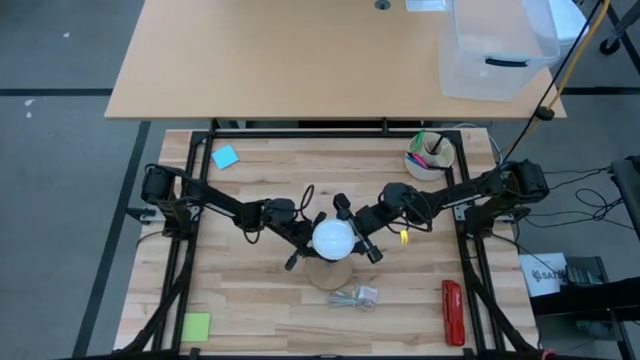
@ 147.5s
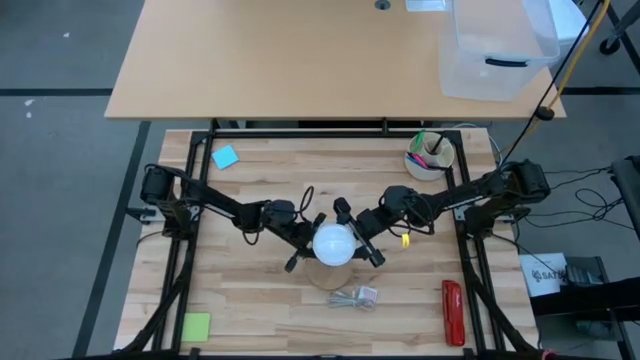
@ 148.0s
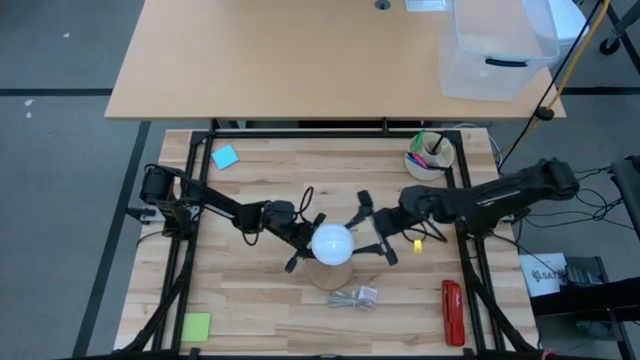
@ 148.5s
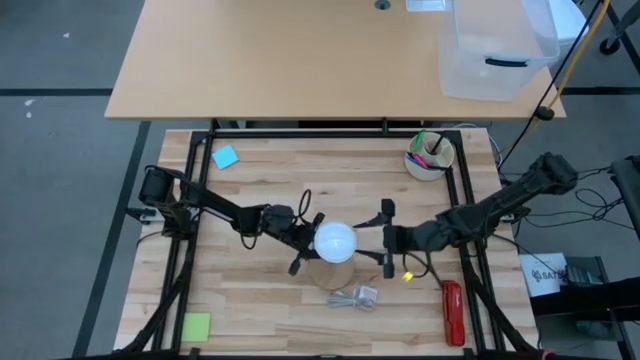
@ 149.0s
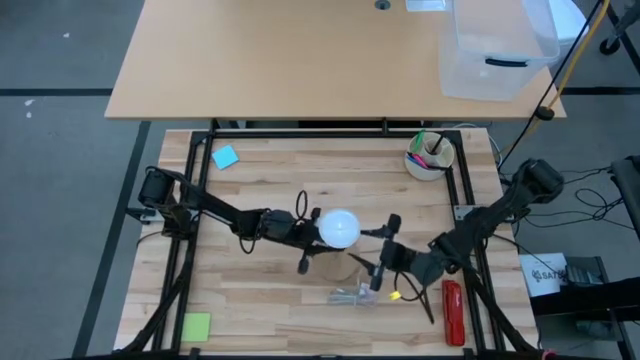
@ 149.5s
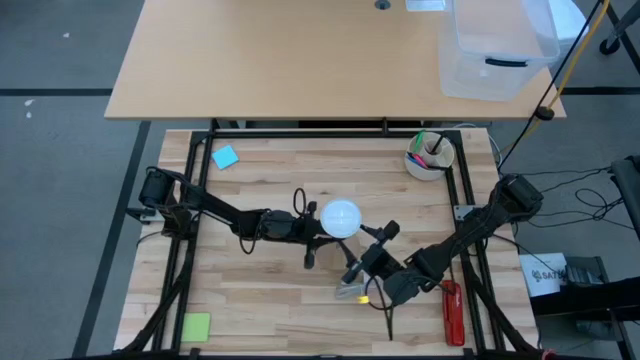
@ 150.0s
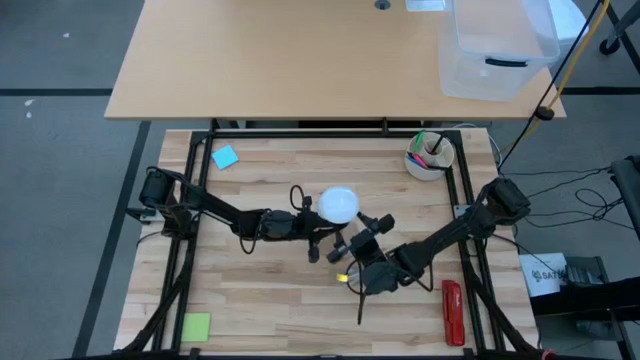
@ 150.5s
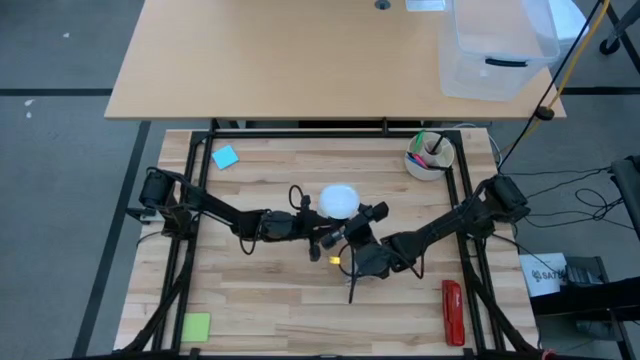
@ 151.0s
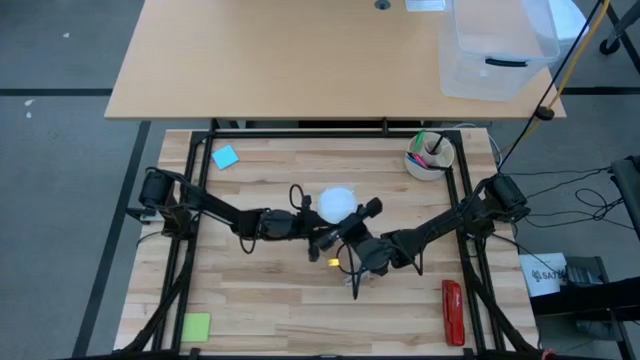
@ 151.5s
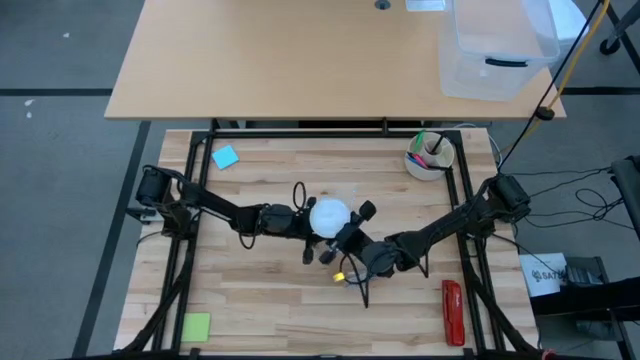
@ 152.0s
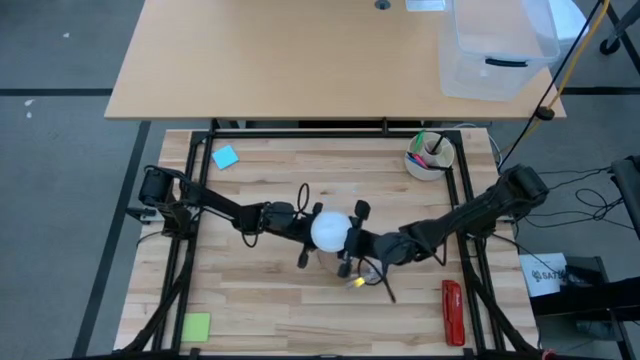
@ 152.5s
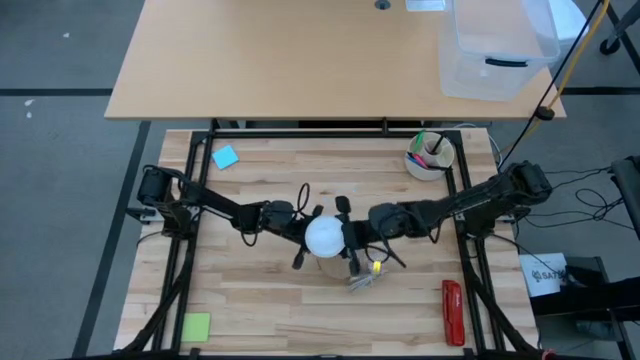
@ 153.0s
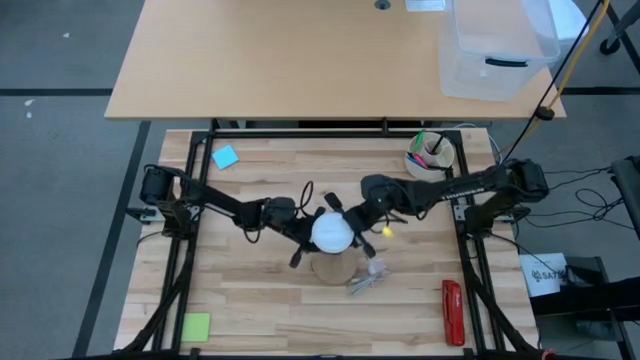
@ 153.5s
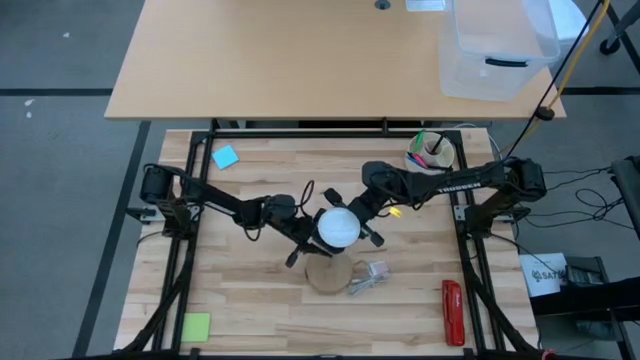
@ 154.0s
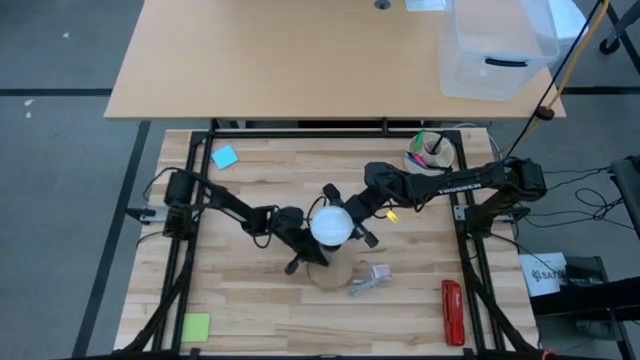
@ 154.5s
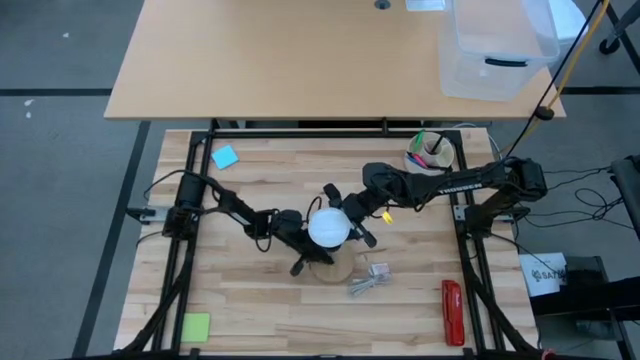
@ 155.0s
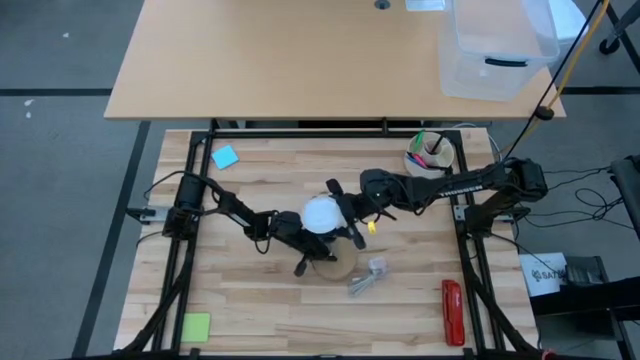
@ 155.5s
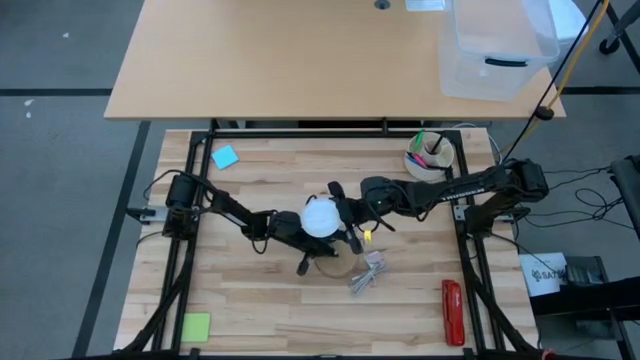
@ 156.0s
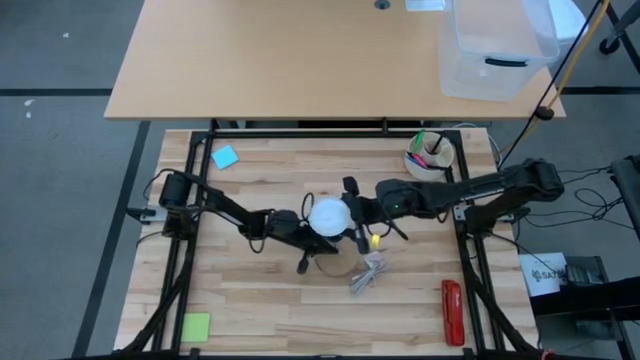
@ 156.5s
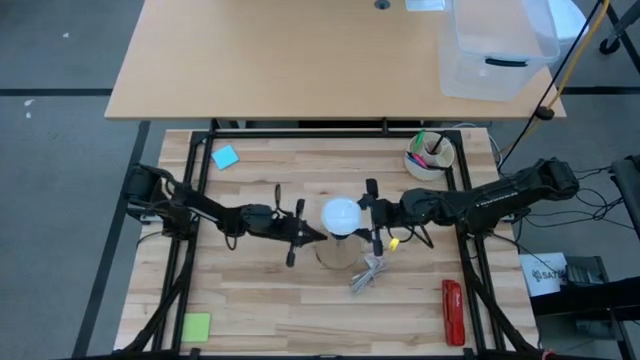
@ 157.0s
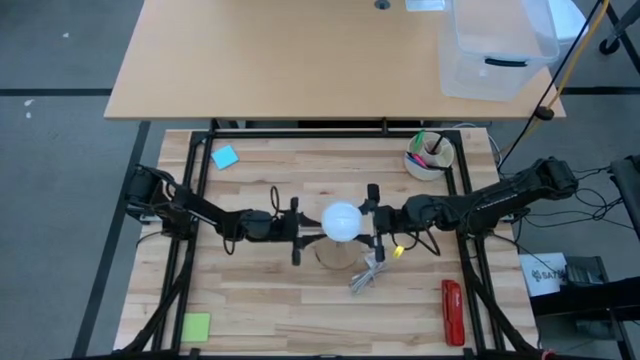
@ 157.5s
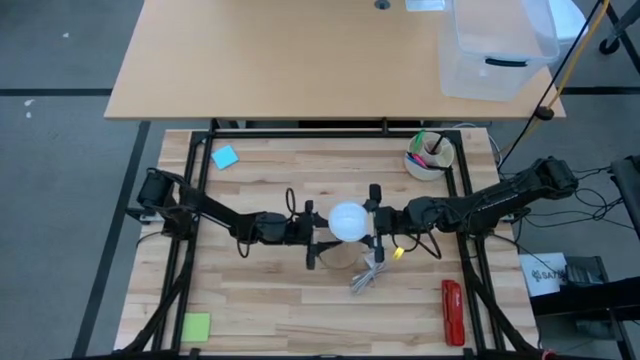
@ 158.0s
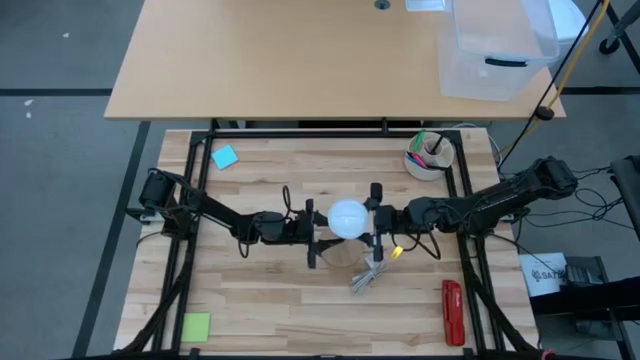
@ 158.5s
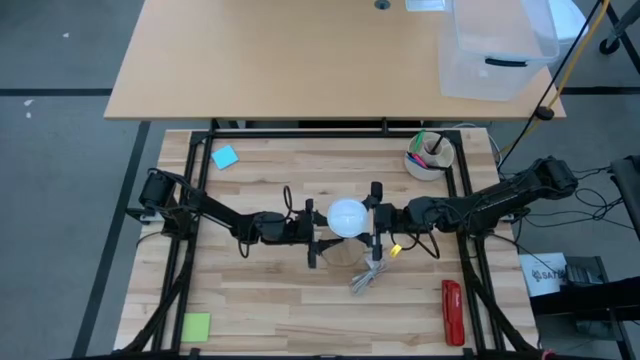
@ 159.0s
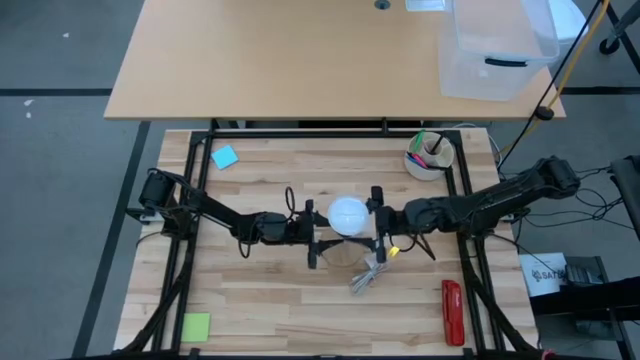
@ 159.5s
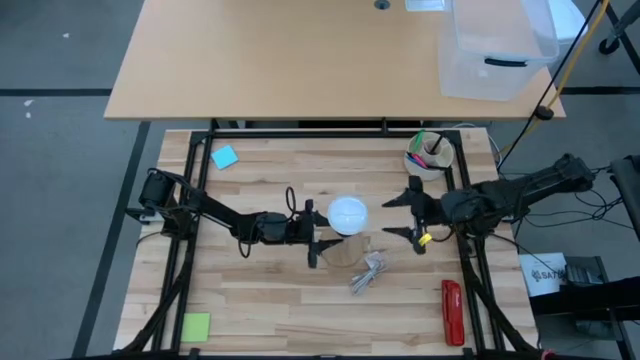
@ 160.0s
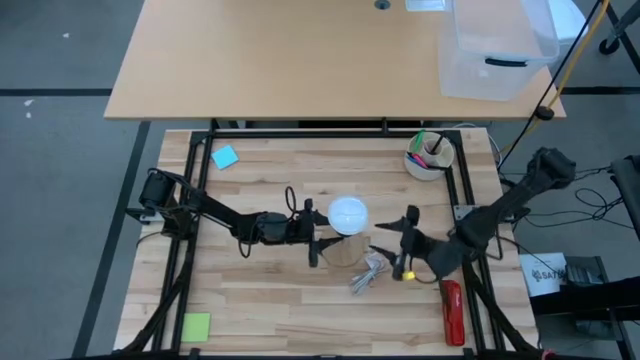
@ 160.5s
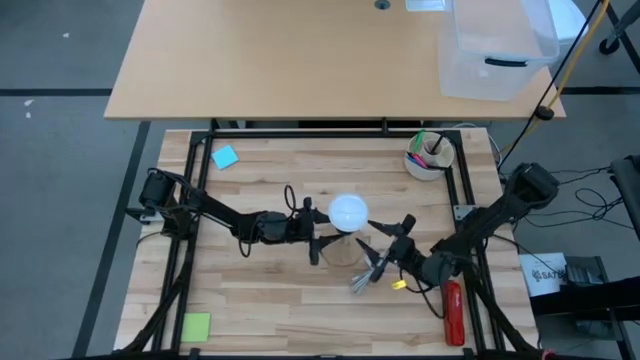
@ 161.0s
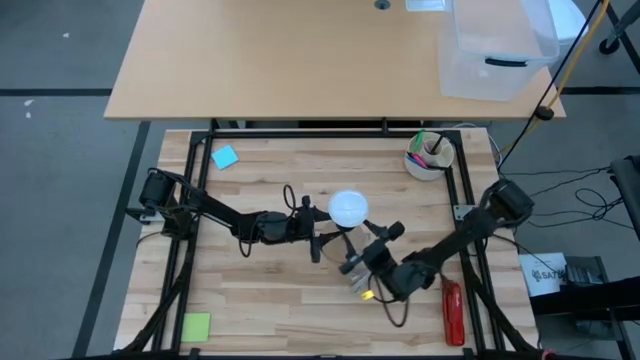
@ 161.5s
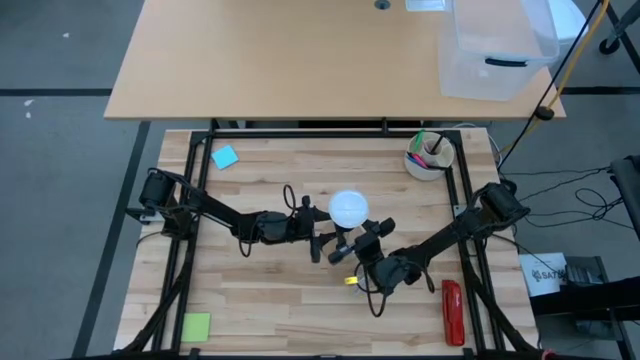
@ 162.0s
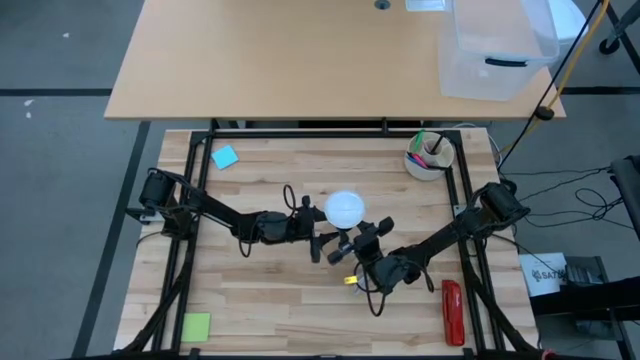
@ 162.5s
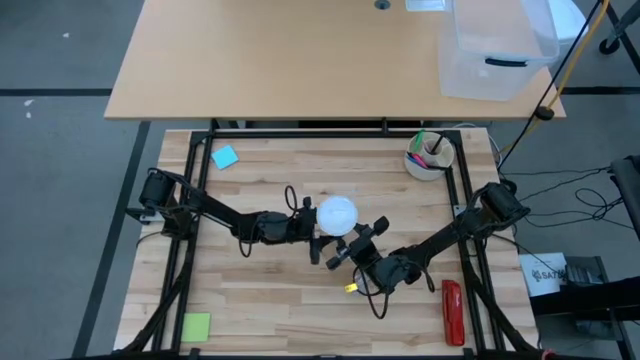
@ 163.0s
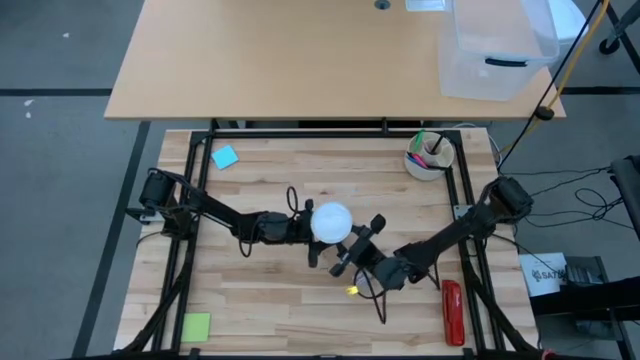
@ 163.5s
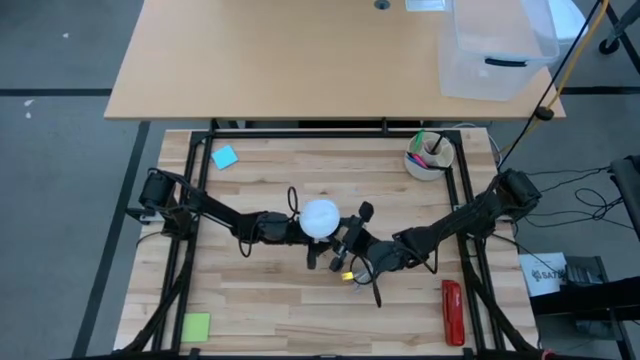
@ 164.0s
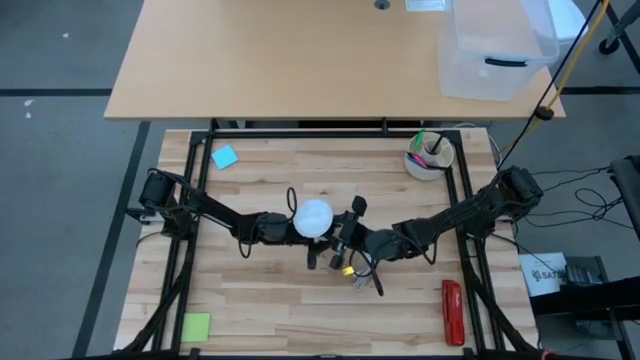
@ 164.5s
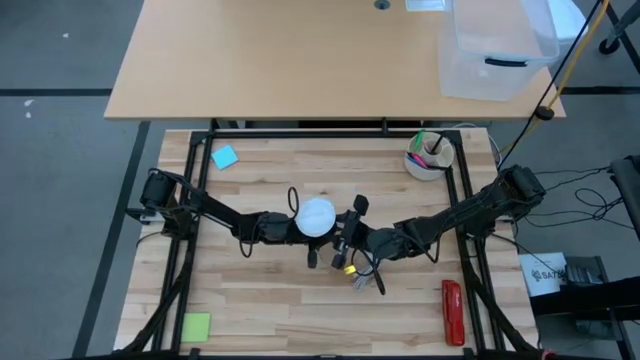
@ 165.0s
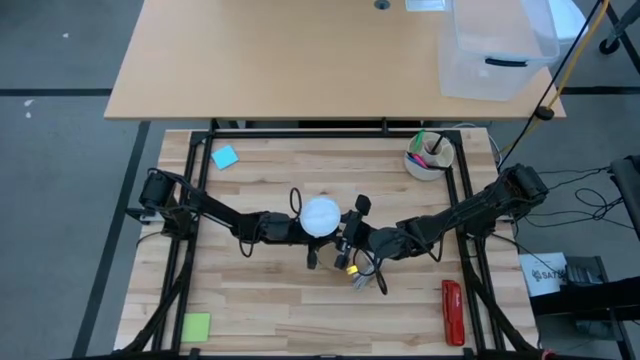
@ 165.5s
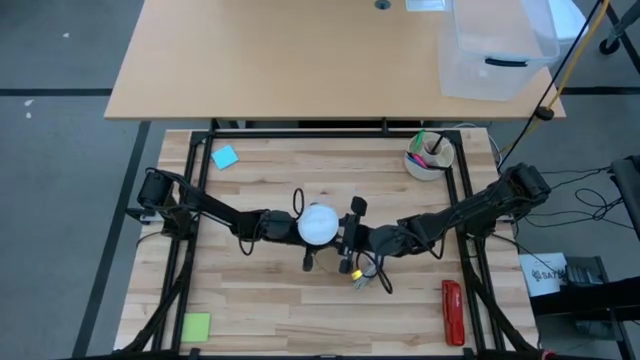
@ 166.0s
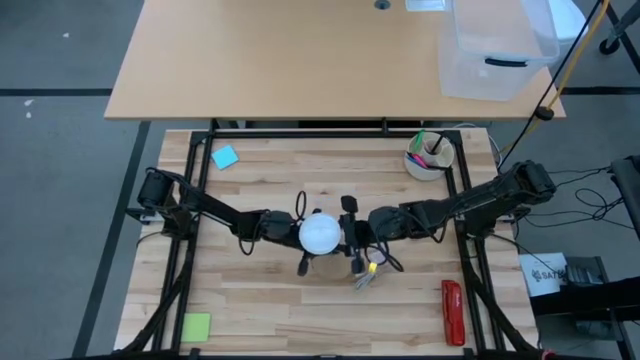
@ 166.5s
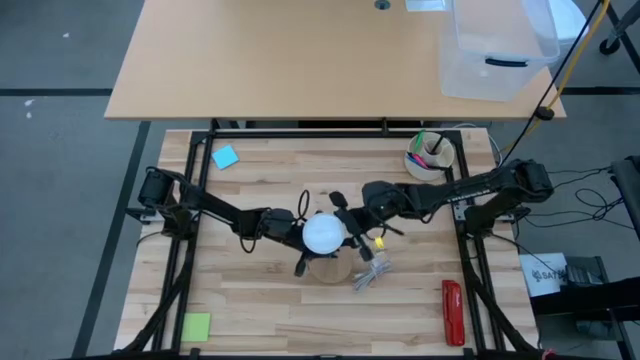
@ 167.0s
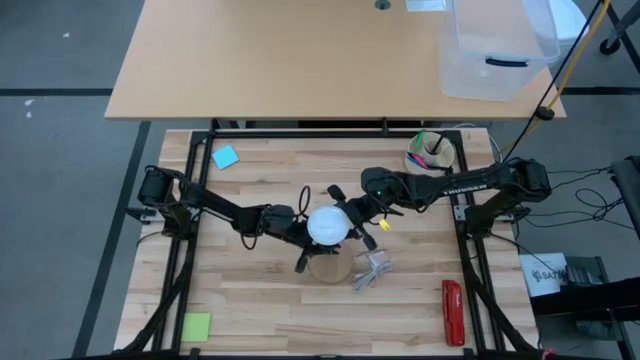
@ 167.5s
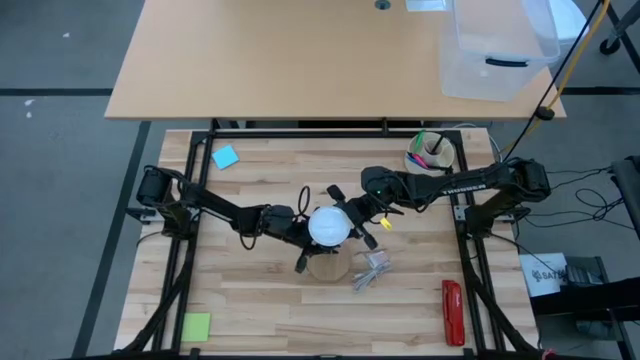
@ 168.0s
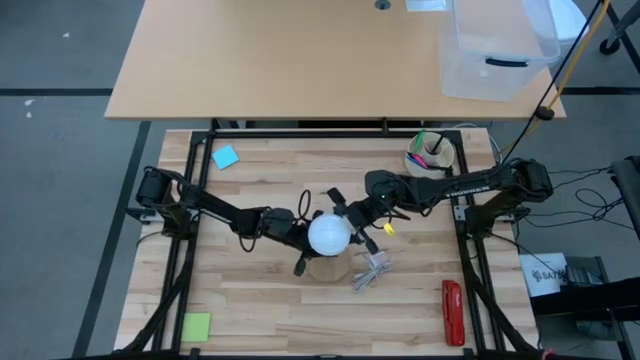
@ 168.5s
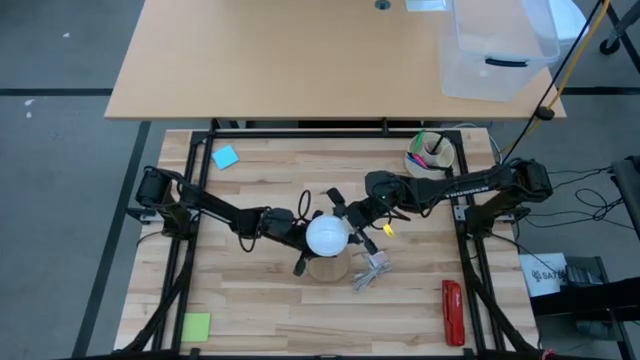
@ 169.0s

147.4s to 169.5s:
Task: Screw lightbulb
Remove the lightbulb from the lamp
